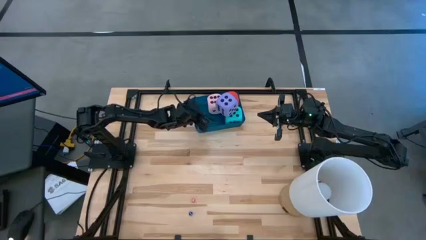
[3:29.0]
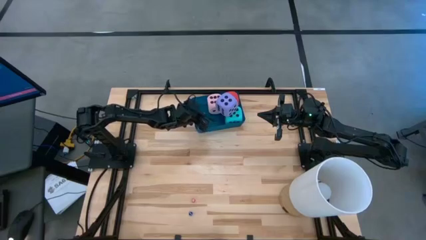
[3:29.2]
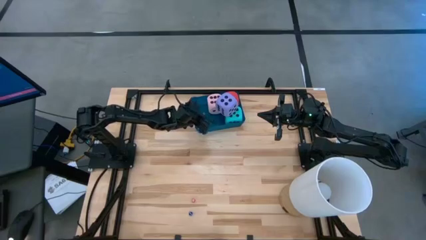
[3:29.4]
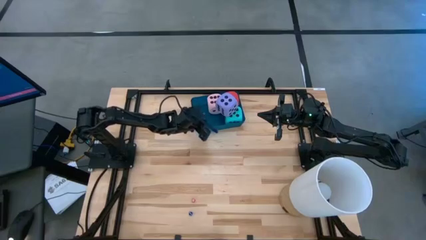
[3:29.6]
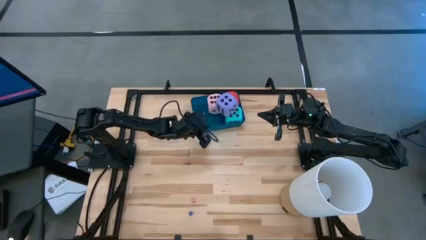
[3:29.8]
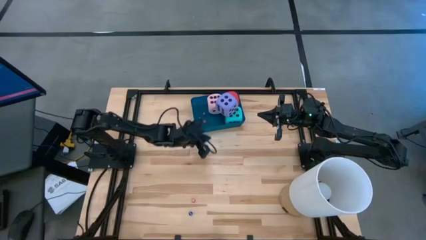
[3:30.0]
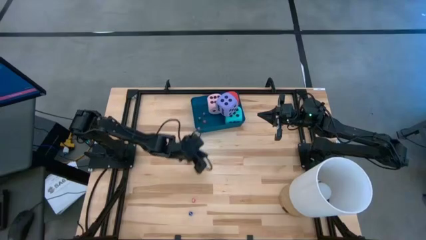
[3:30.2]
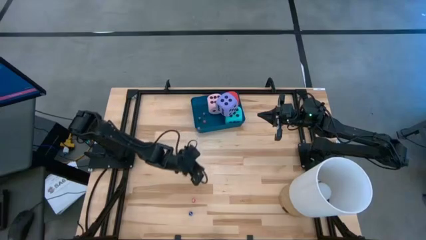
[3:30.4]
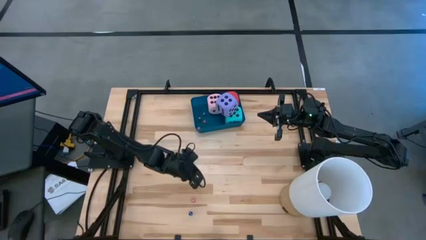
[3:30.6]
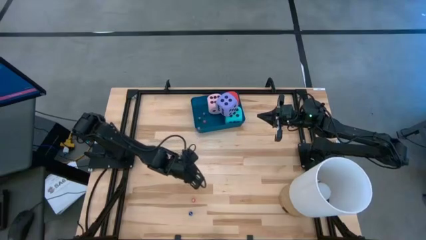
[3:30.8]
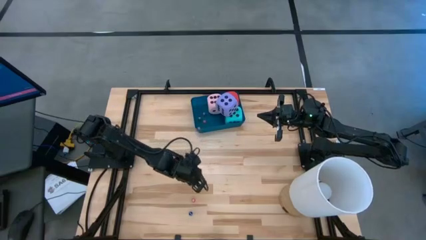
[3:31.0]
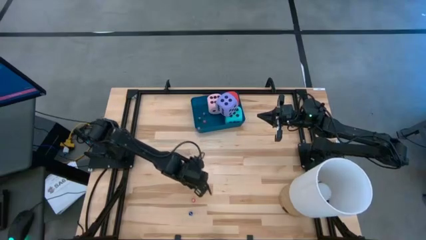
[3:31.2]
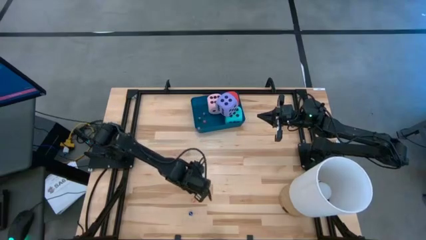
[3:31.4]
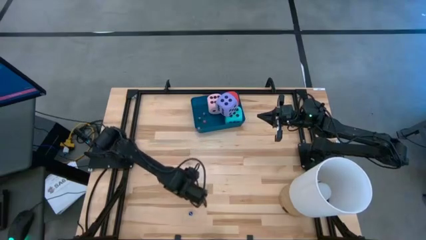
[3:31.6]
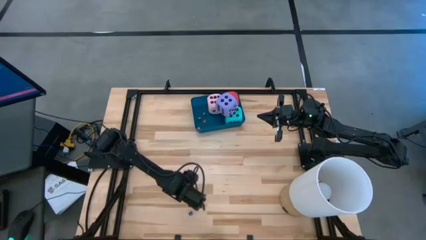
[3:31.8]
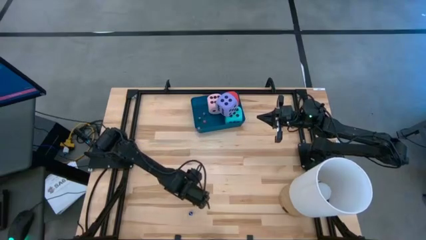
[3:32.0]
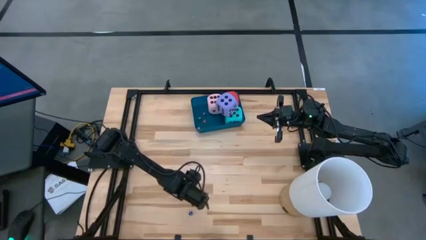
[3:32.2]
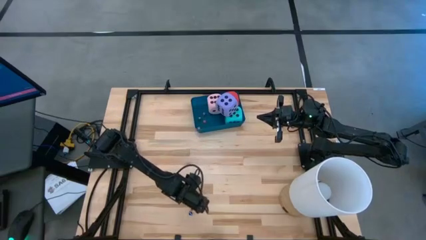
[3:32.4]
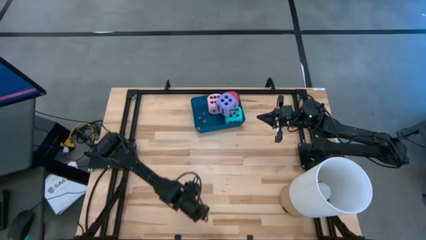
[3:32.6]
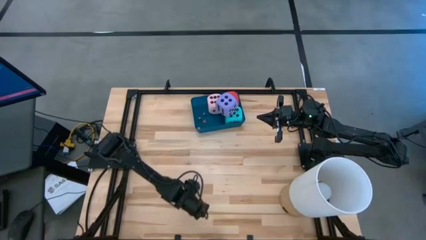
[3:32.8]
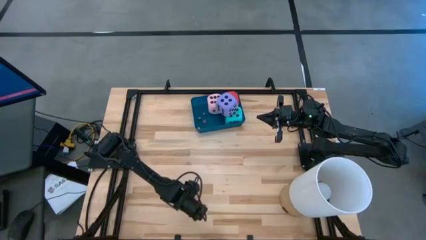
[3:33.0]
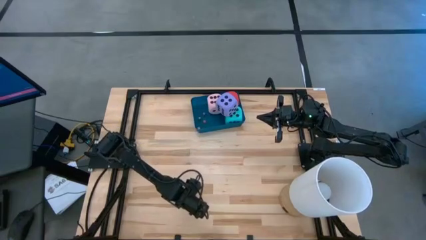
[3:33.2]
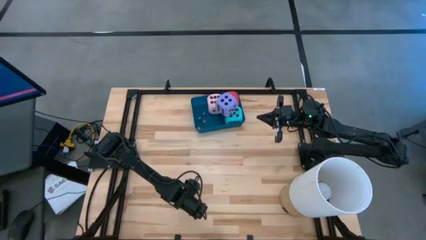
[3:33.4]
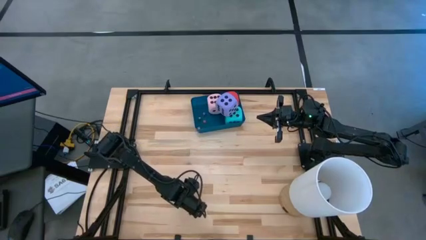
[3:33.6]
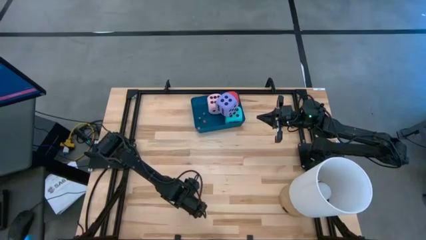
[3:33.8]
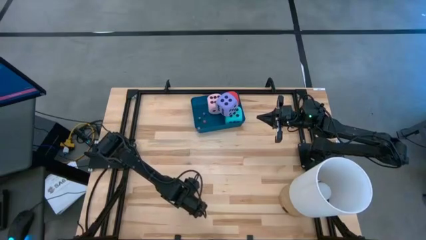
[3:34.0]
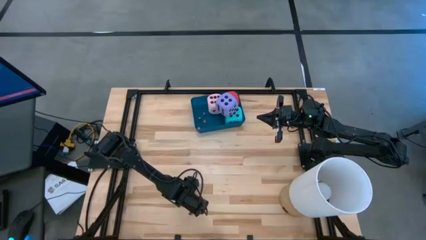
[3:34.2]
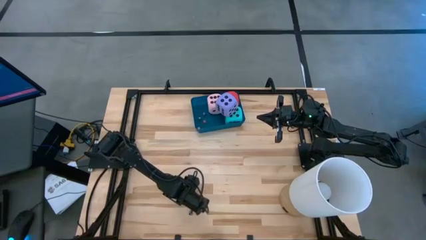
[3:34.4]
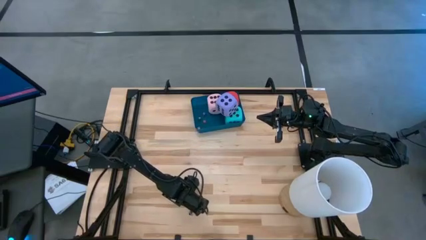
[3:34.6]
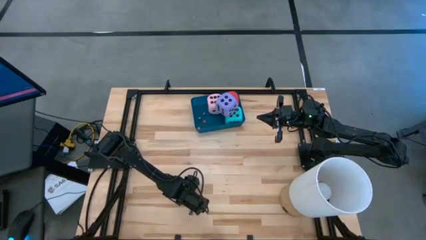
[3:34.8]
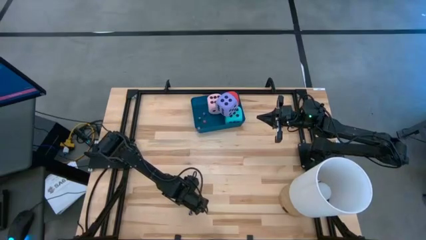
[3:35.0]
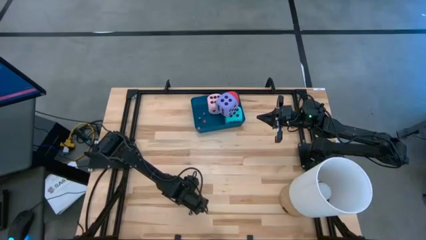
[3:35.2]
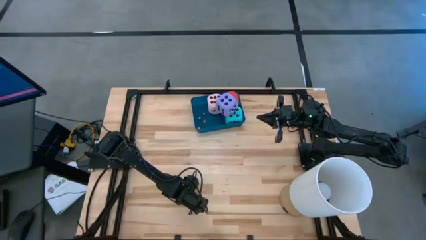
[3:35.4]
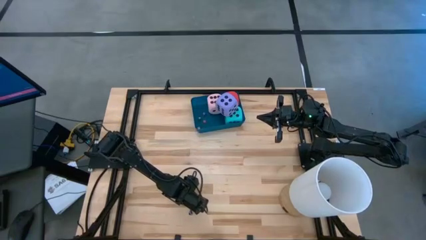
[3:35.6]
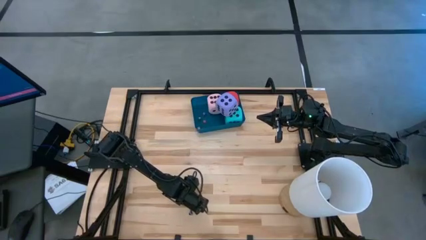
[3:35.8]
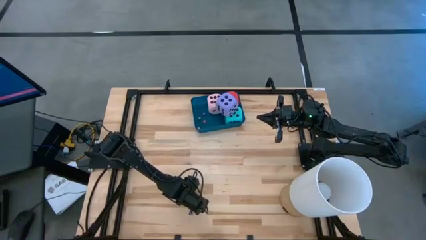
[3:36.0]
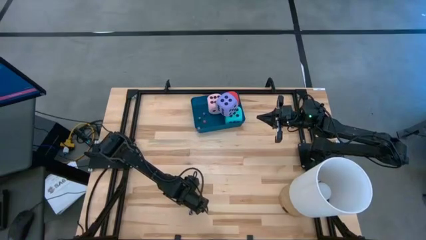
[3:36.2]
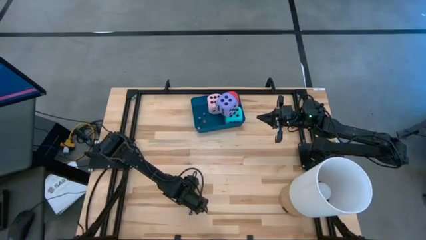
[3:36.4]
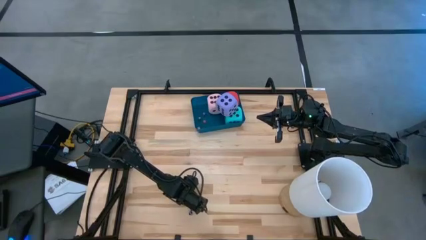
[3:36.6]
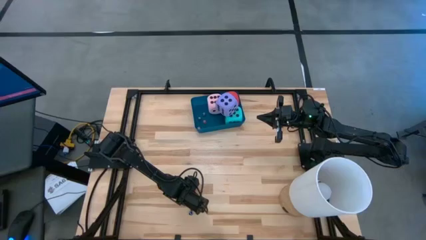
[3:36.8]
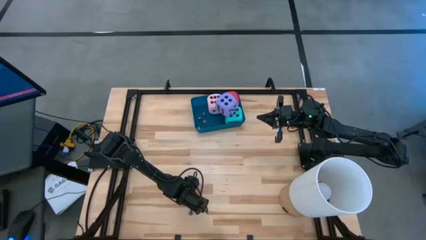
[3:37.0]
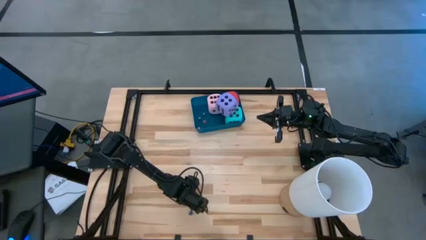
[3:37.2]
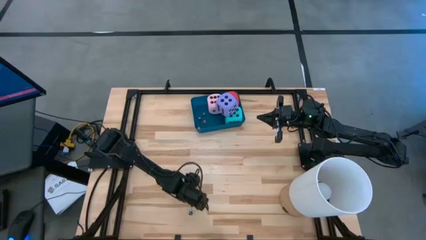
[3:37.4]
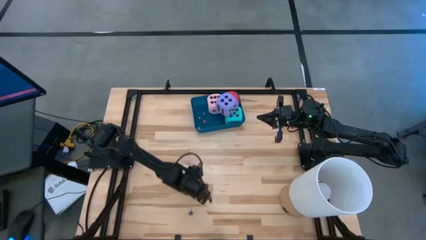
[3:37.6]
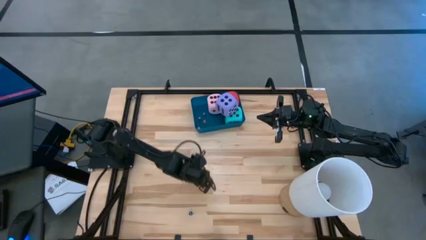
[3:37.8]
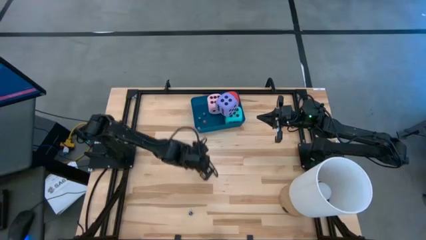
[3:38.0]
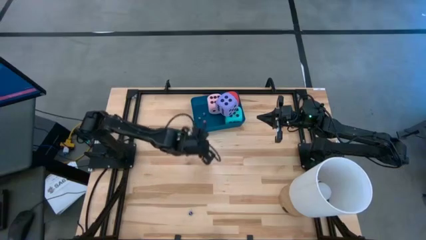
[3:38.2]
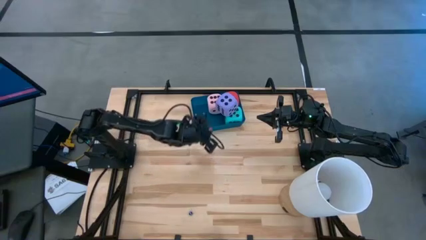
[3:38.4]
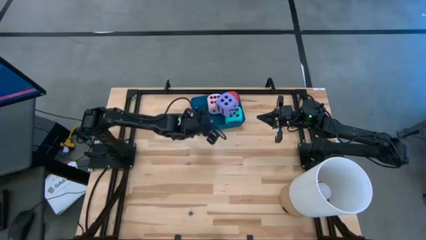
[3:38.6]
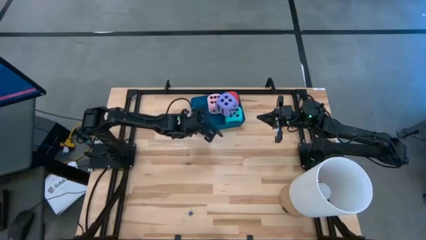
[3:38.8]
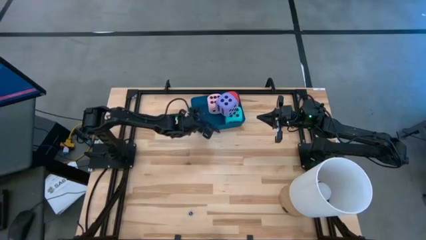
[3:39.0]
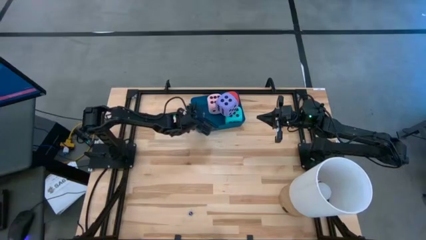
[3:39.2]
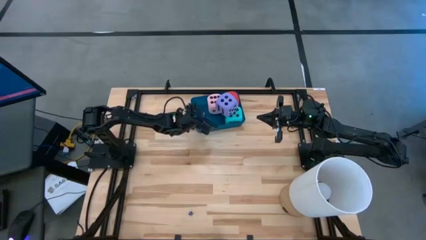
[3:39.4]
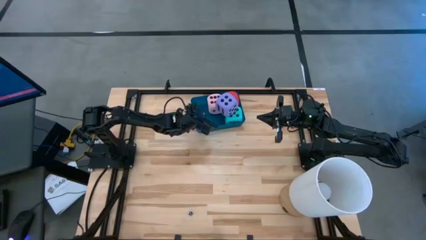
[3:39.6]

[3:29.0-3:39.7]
Task: Pick & Place Dice
Put the small red dice into the blue bin
